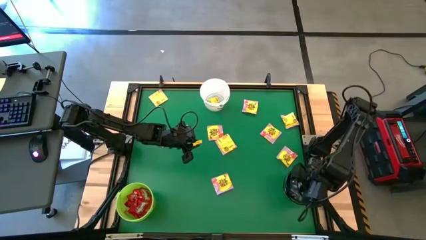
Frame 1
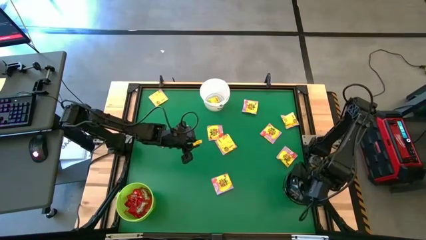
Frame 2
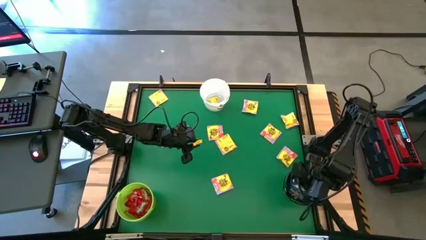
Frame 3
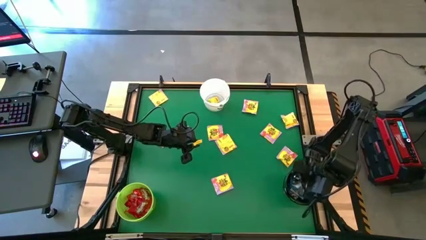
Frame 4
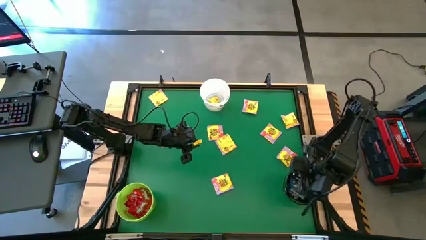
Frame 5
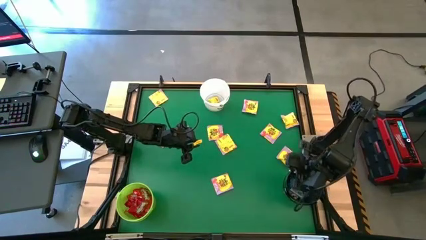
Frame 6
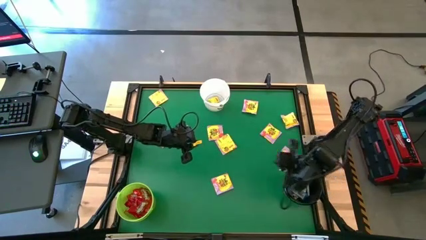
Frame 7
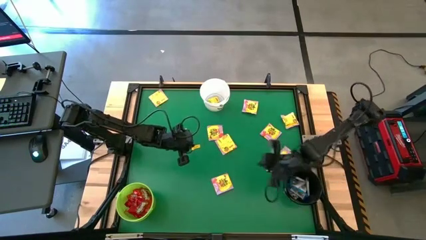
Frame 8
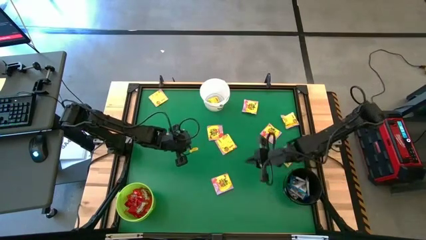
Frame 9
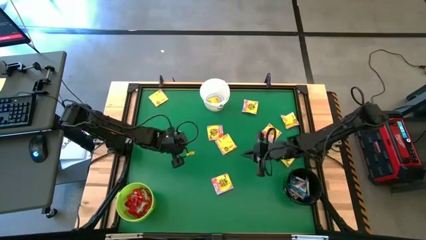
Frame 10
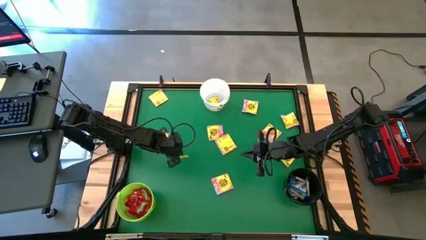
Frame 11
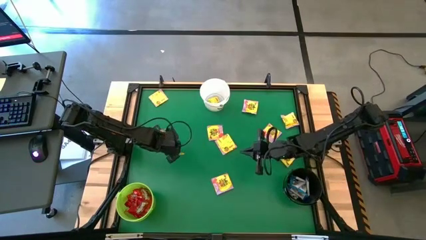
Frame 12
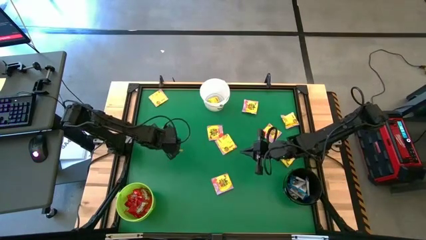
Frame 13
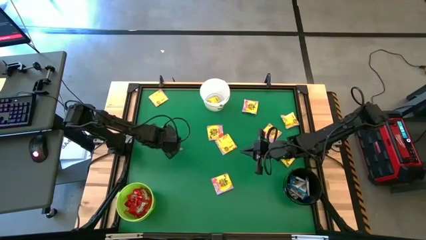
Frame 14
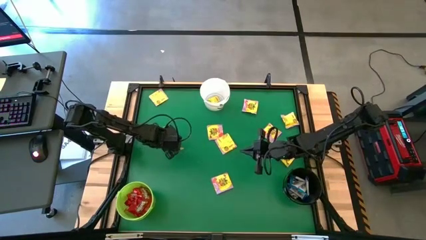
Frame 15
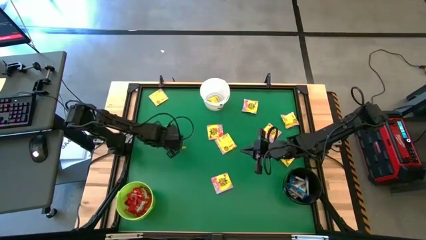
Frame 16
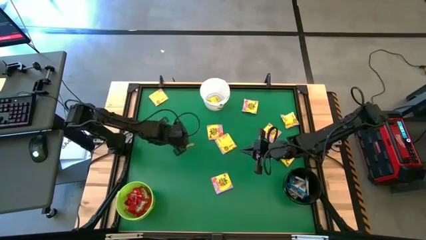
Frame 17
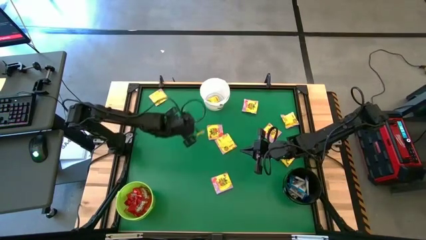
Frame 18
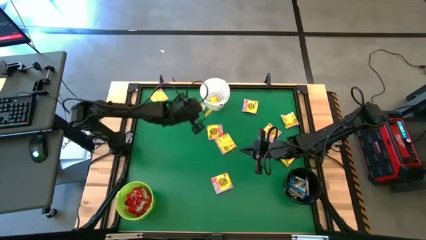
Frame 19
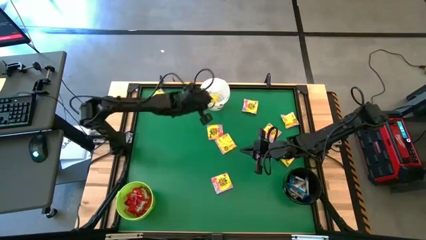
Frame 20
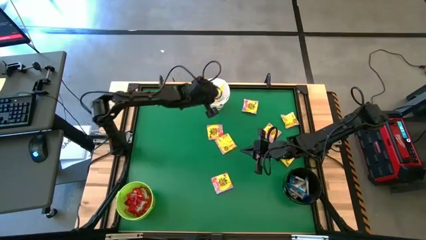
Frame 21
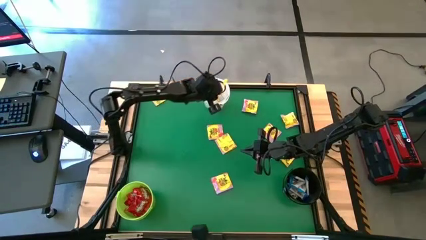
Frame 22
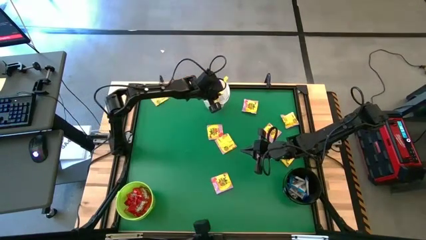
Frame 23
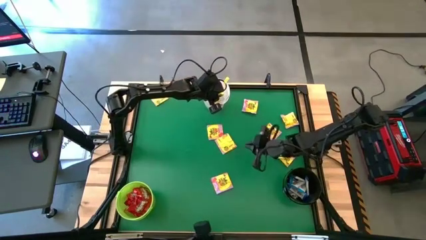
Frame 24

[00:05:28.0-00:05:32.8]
Task: Sort candy by brand, put in halloween buckets
Put the yellow candy into the white bucket

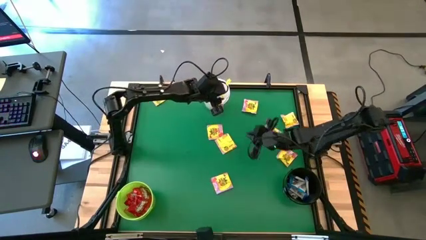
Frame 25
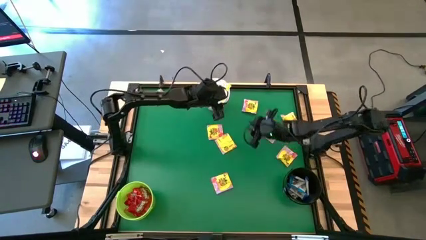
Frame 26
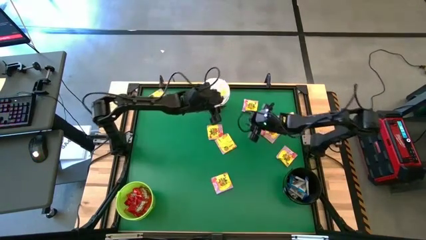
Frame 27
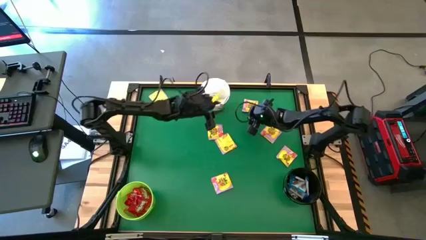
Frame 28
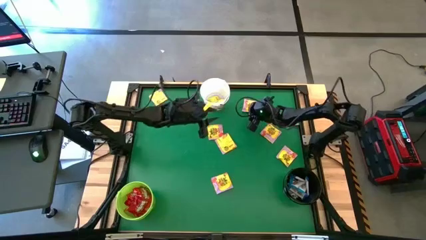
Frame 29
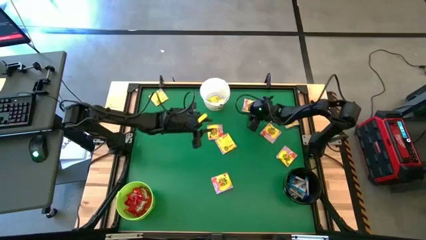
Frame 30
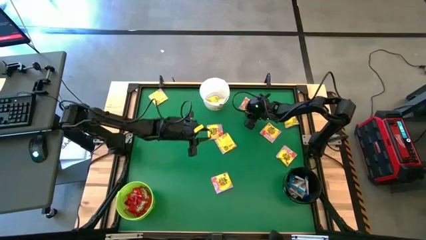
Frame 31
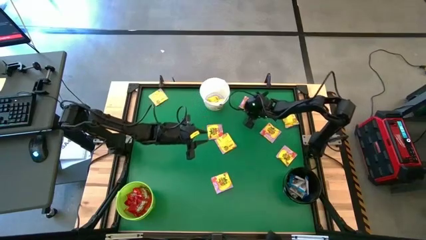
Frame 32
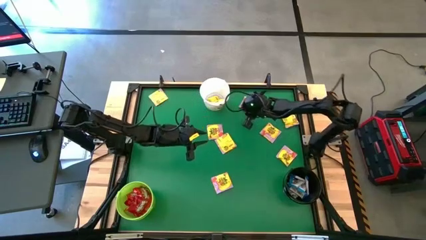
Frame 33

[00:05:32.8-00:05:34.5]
Put the yellow candy into the white bucket

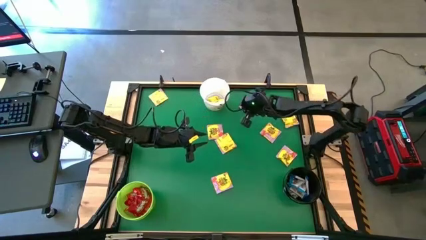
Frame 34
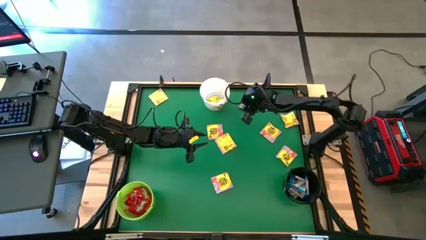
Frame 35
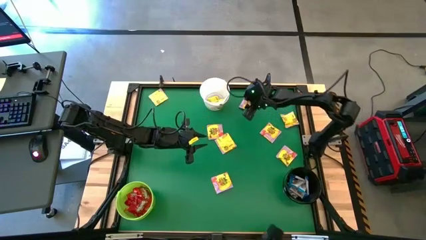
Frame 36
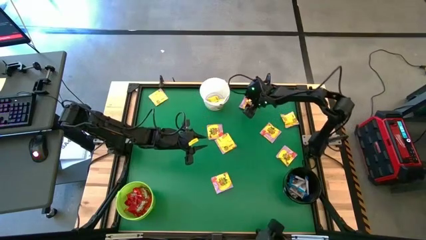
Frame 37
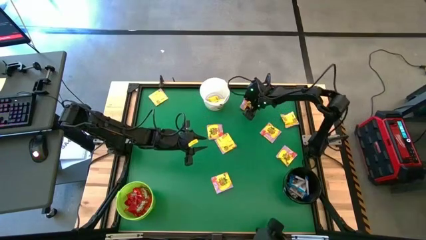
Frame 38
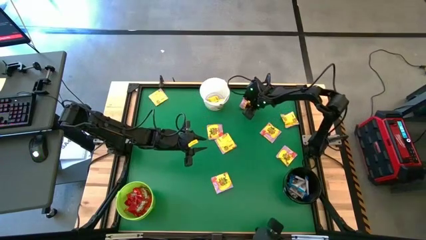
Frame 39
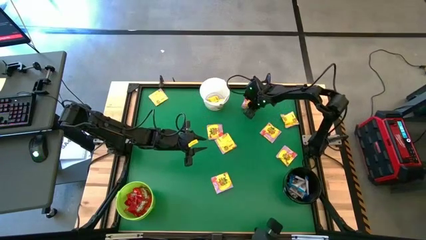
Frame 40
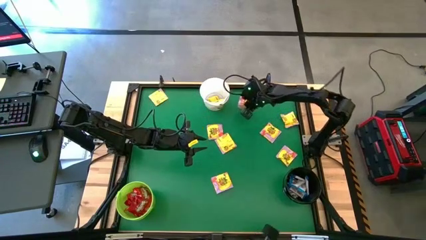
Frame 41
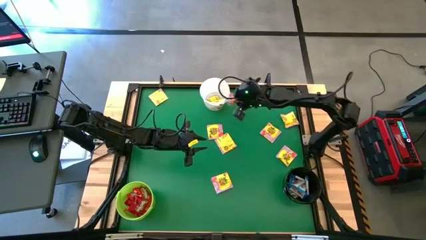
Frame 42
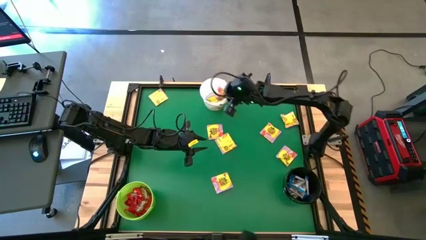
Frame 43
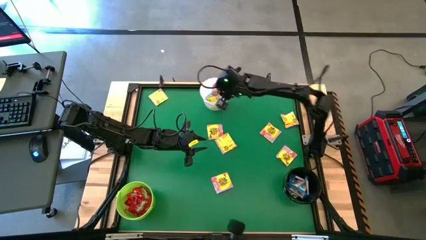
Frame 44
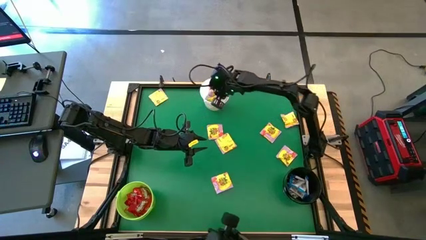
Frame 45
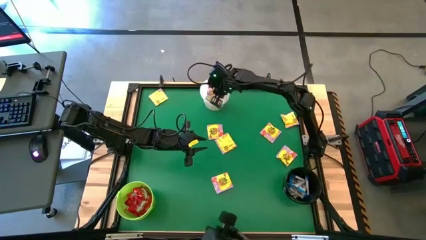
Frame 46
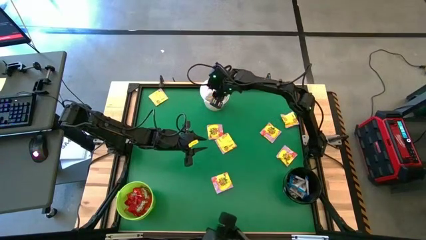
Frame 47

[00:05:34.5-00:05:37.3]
Put the yellow candy into the white bucket

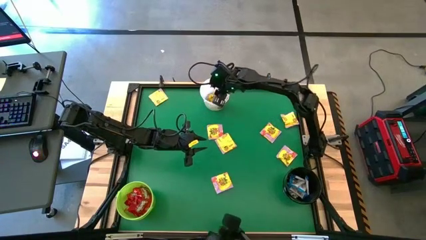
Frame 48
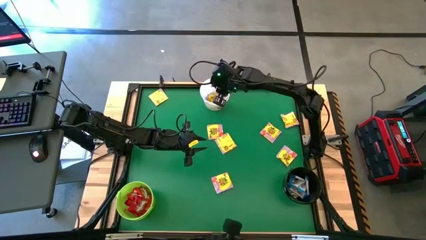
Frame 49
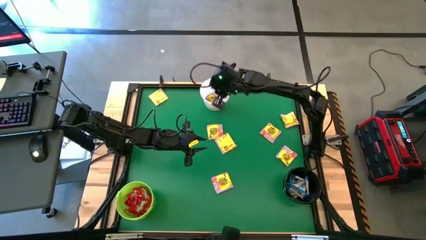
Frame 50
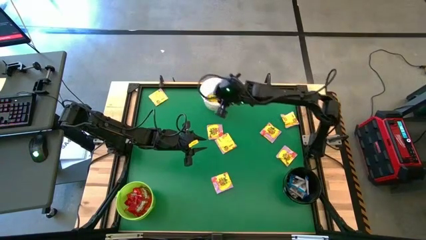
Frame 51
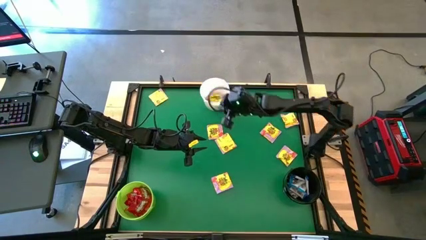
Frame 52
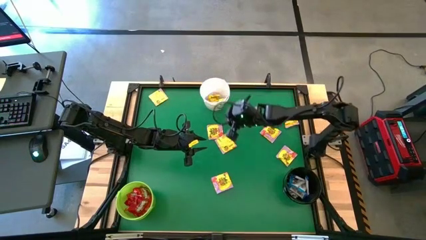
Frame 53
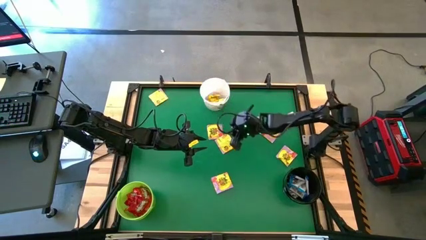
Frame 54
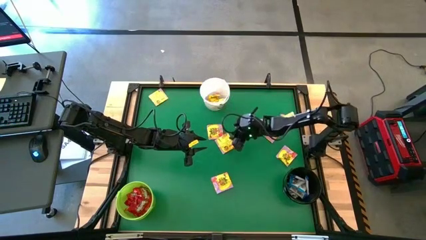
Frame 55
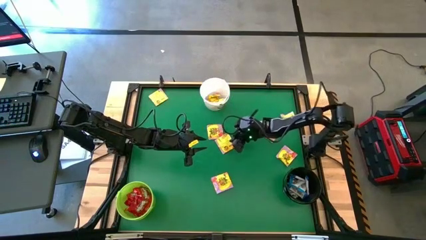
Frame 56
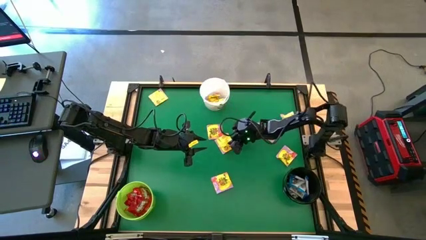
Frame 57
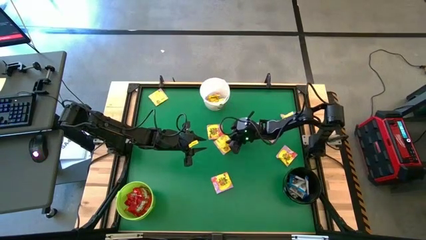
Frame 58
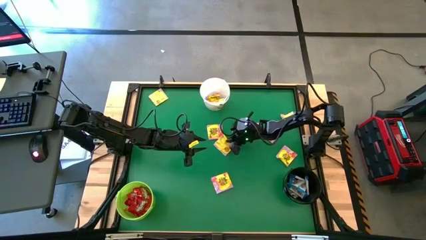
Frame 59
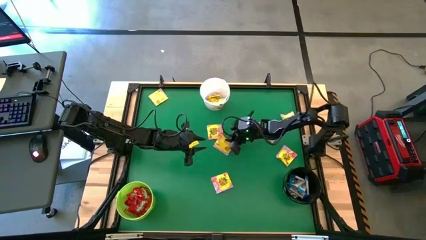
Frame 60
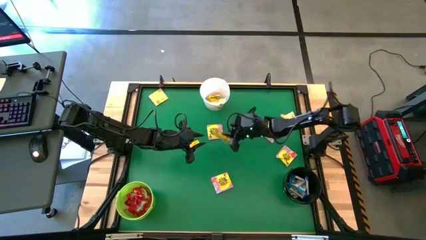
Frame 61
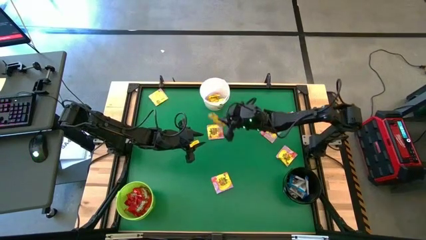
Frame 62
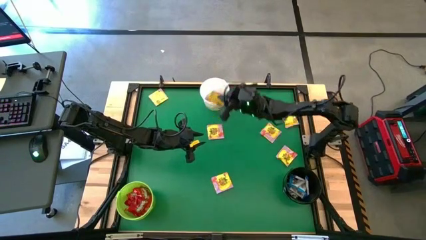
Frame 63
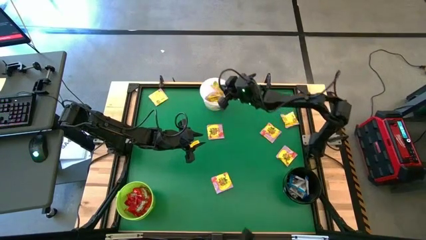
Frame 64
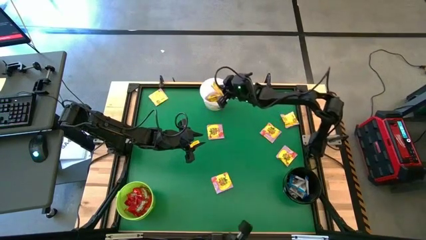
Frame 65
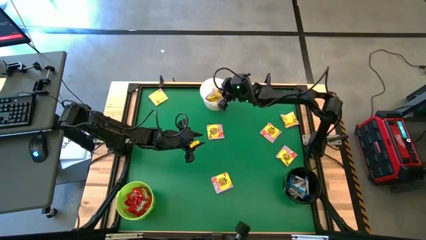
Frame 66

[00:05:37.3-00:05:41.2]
Put the yellow candy into the white bucket

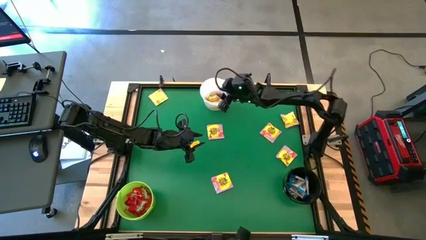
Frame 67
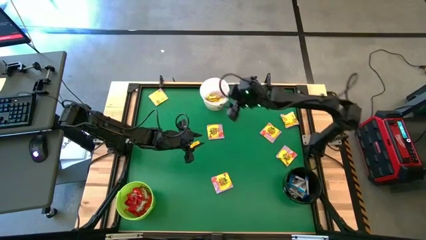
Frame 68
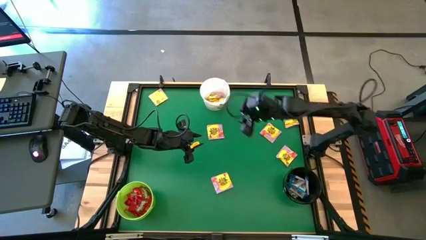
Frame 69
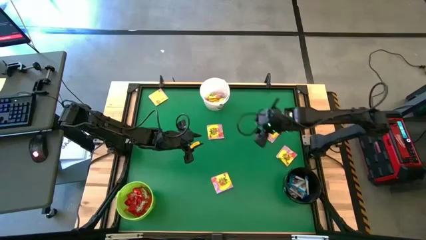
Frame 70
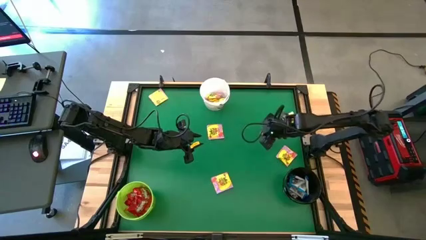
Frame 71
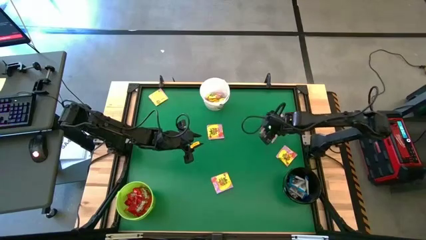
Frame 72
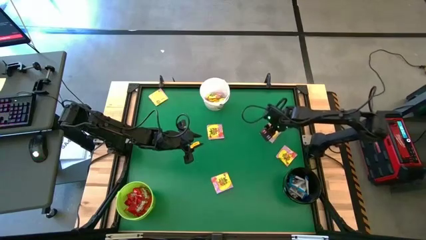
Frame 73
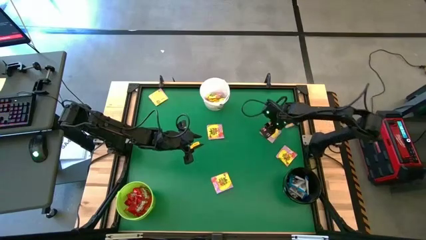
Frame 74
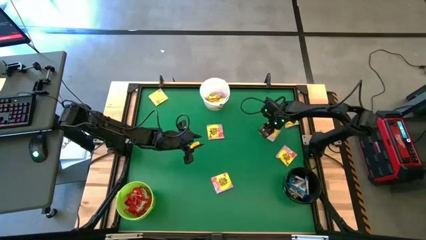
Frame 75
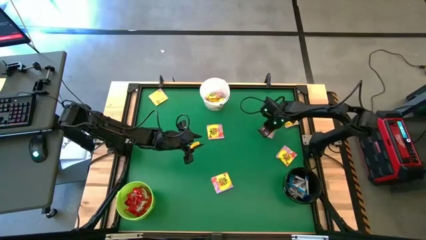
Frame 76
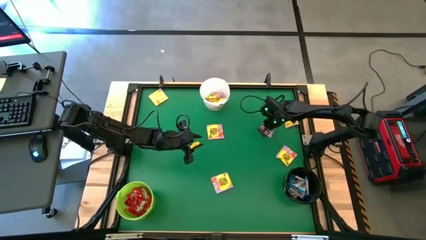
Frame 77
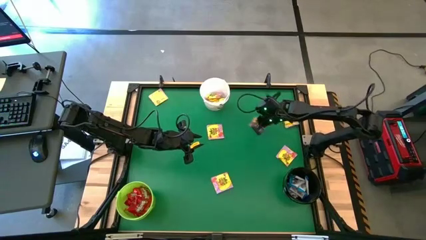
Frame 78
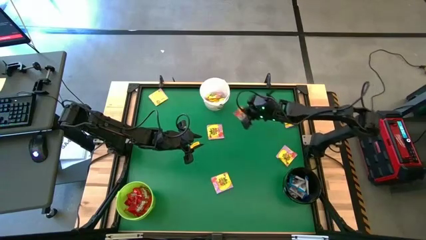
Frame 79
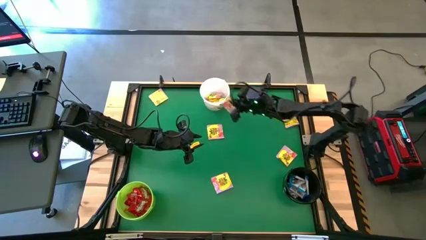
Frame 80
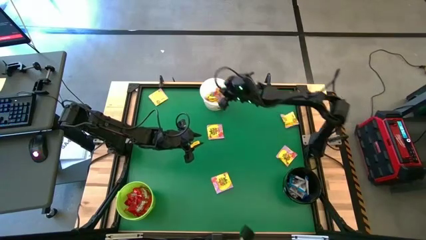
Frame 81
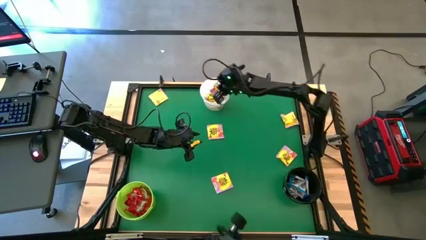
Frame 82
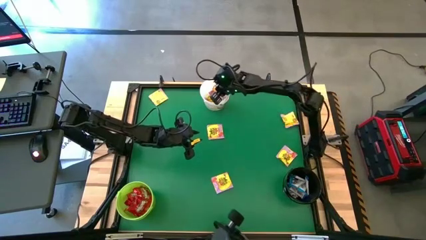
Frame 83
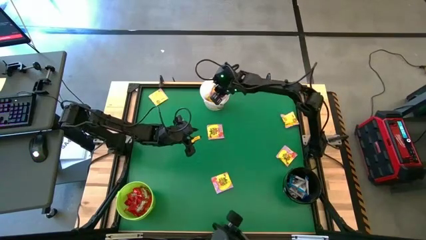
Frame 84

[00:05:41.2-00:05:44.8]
Put the yellow candy into the white bucket
